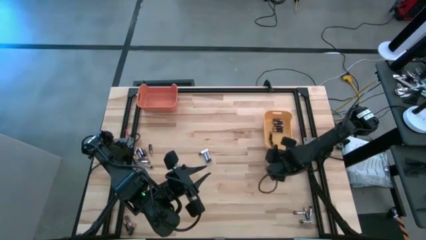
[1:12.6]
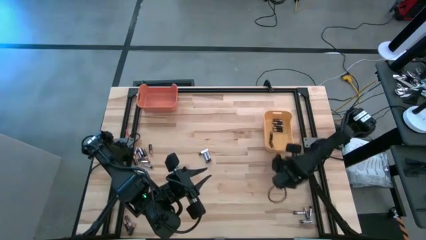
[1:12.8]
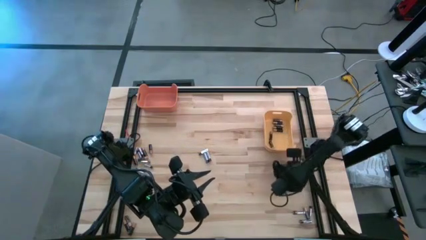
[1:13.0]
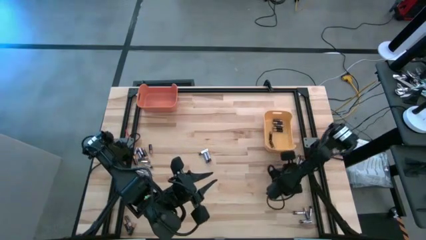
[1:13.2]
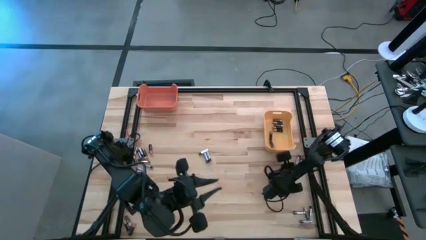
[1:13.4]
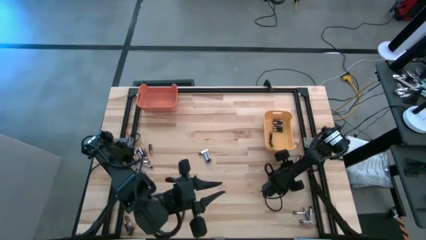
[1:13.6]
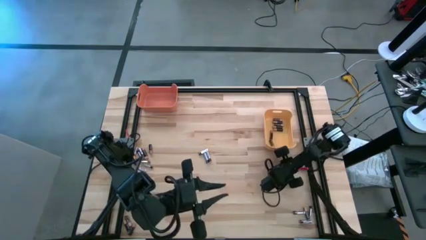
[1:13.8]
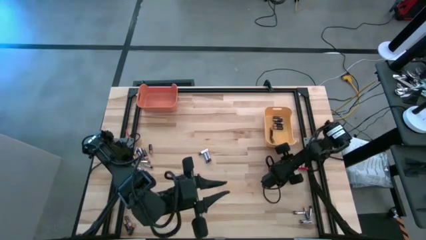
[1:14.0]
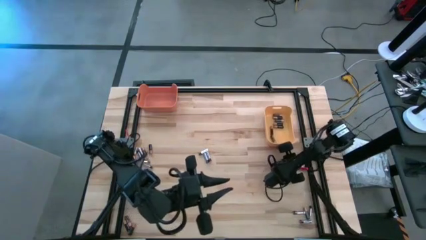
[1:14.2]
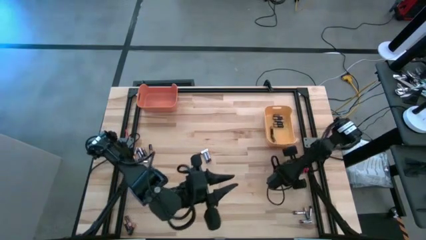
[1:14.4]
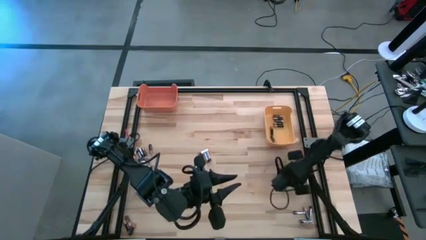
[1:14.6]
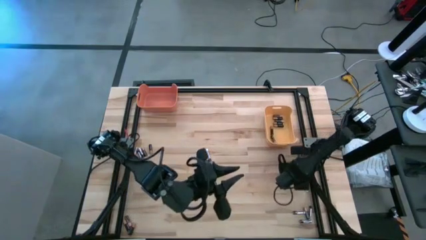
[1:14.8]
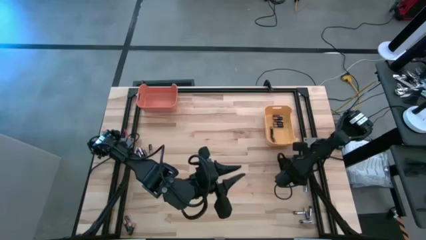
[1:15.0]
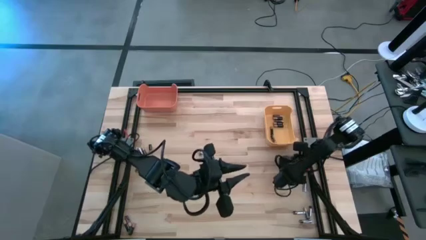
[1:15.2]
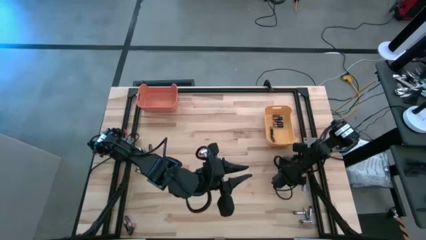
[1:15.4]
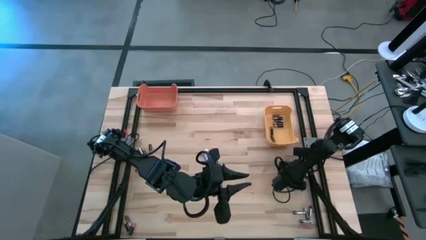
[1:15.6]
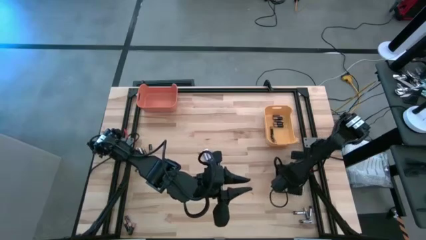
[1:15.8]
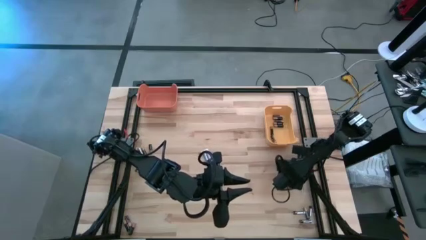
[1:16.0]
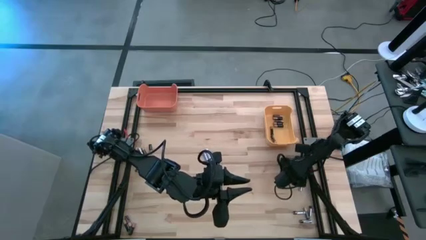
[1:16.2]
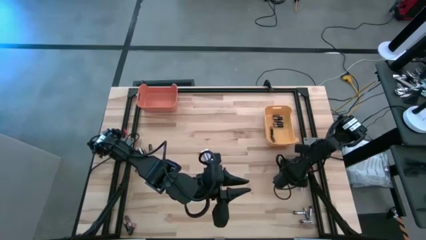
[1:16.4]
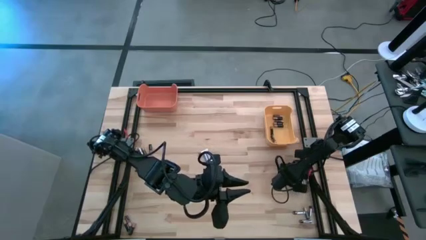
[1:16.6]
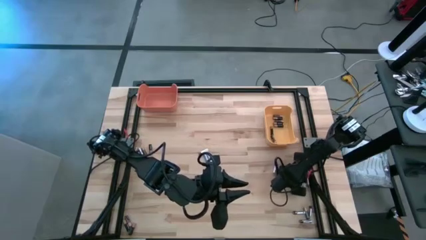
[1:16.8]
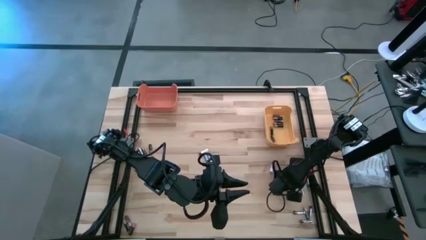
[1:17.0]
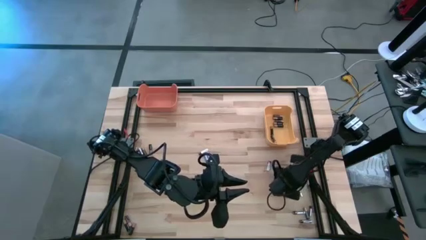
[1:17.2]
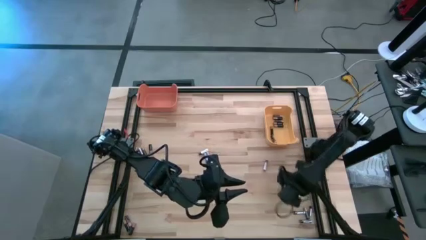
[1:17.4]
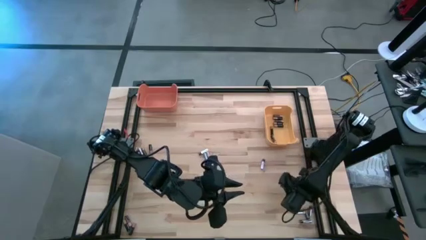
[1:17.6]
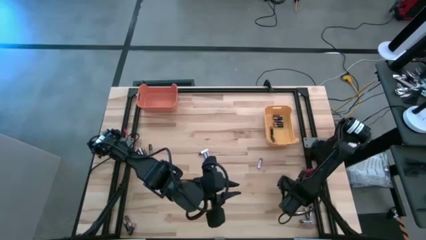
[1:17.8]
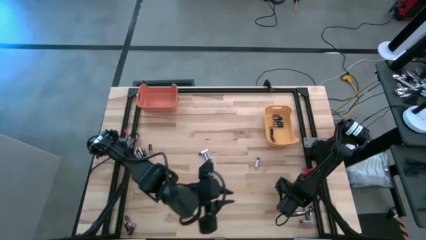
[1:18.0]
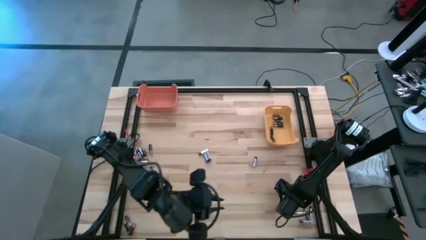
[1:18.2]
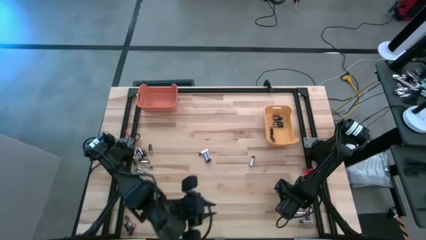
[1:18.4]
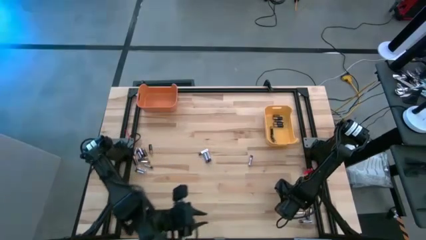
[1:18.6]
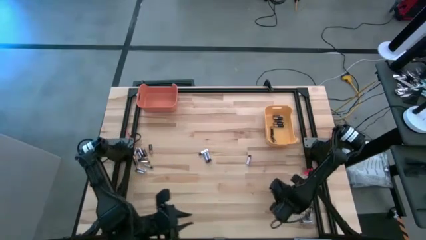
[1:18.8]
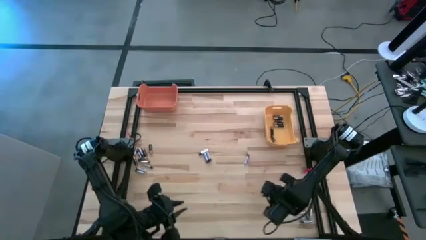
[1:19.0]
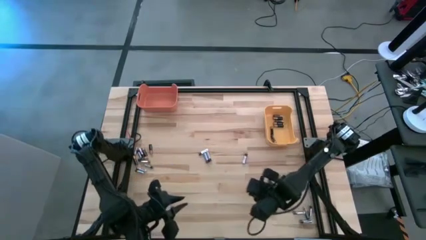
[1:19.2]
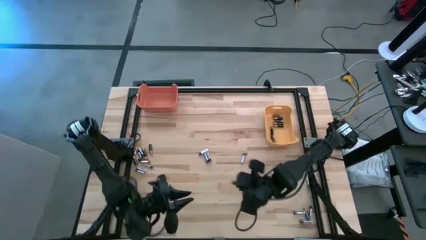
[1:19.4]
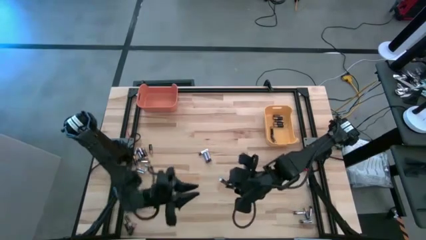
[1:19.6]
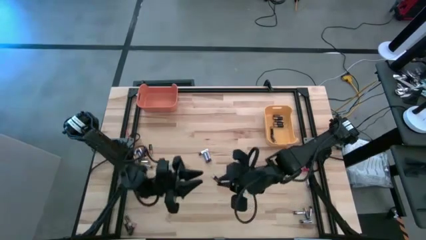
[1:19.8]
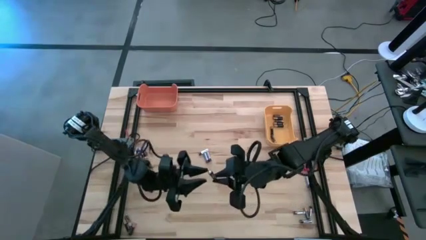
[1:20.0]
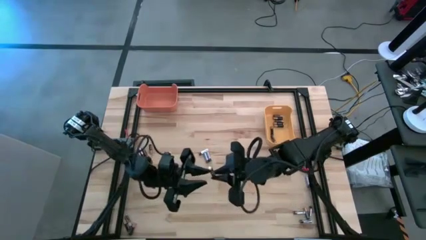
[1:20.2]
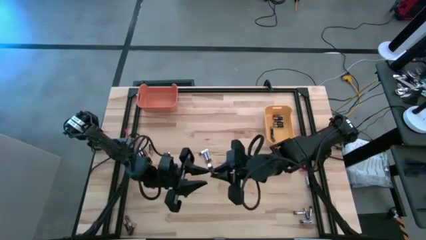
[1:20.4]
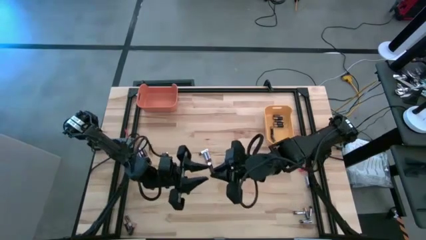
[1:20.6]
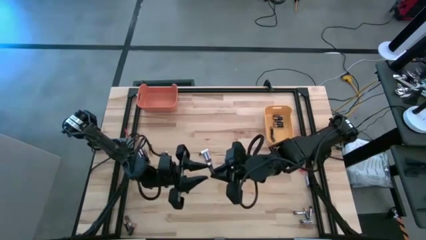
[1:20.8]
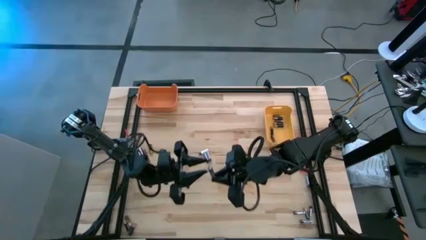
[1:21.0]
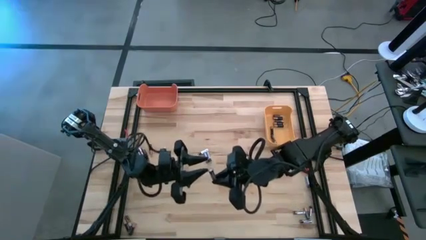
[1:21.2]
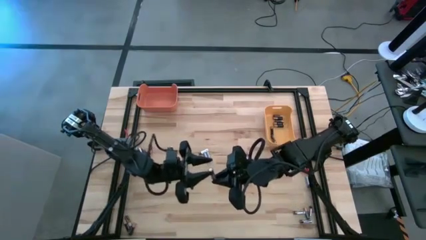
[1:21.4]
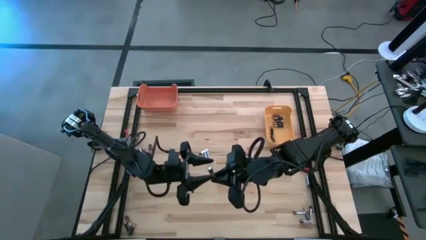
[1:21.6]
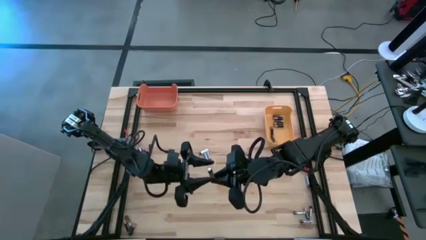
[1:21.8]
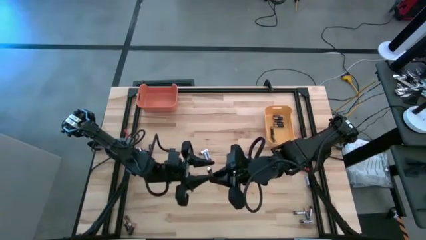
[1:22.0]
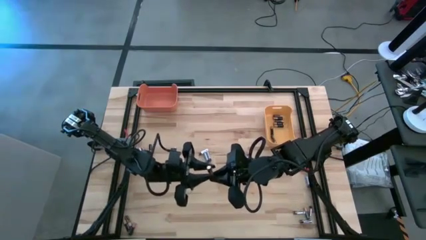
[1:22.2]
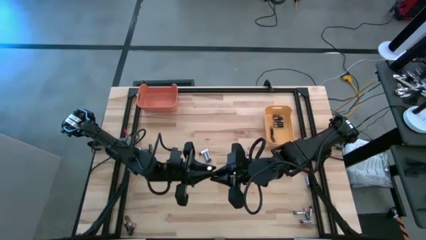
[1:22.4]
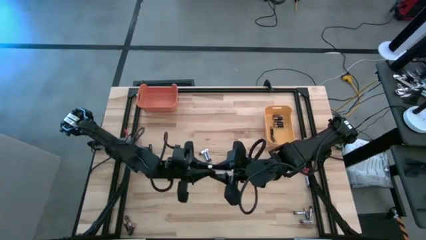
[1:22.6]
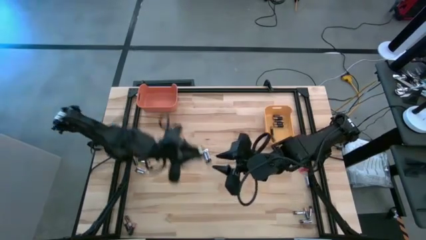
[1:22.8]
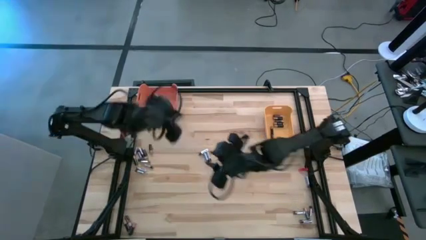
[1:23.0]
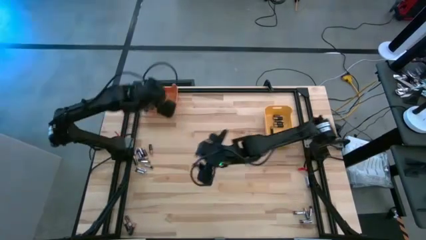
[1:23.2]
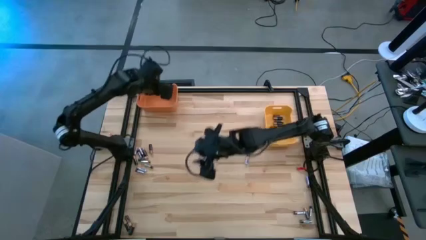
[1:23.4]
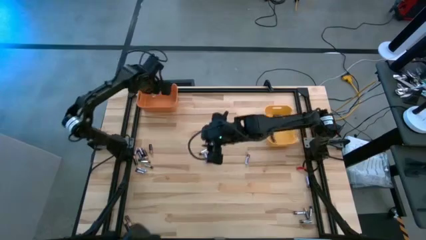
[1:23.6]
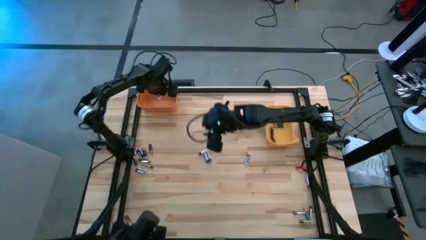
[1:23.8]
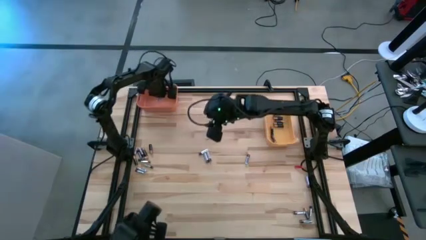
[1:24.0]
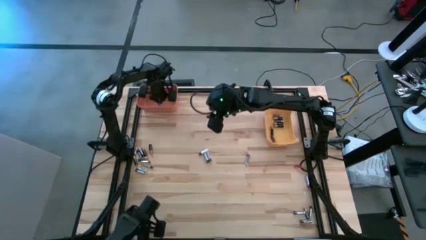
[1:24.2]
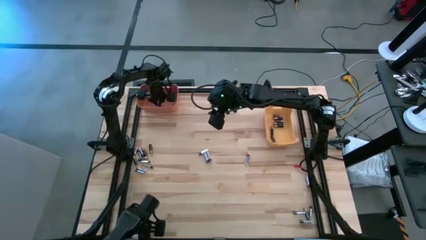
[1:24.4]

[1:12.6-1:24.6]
Task: Sort batteries
Put the silver battery into the orange bin

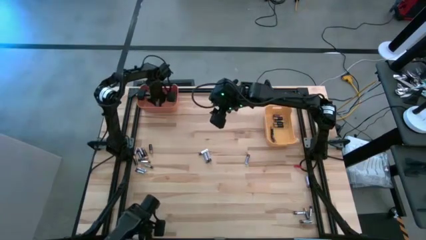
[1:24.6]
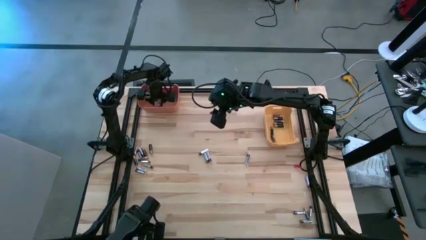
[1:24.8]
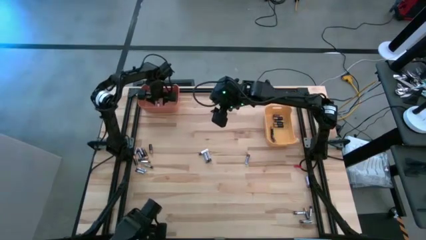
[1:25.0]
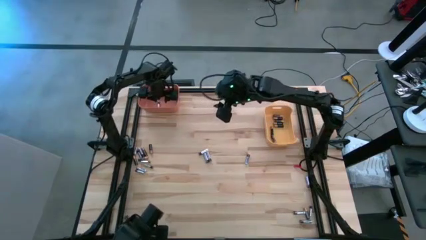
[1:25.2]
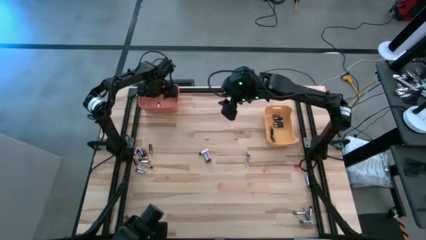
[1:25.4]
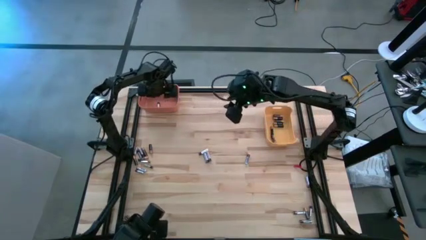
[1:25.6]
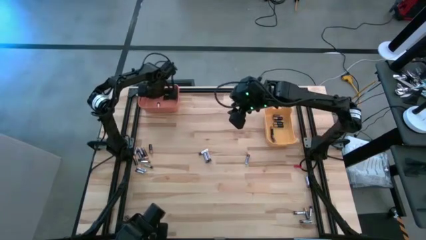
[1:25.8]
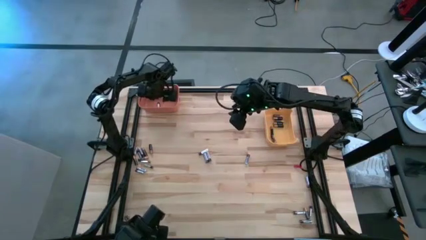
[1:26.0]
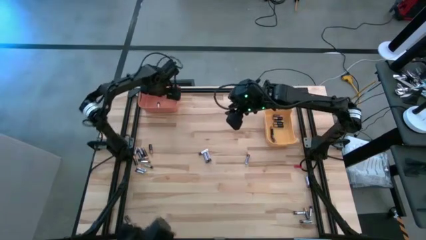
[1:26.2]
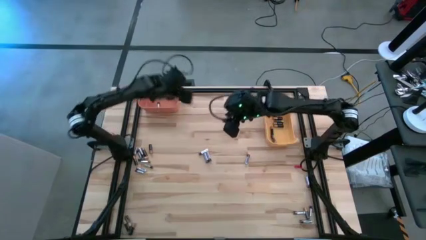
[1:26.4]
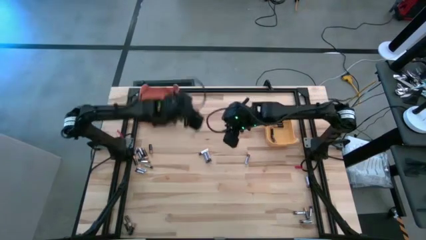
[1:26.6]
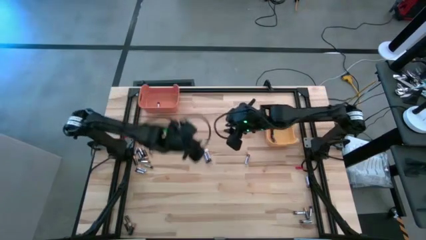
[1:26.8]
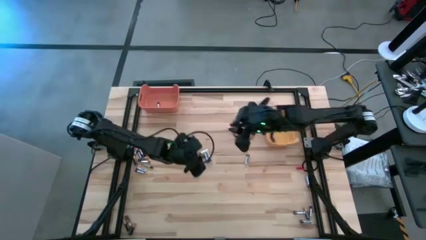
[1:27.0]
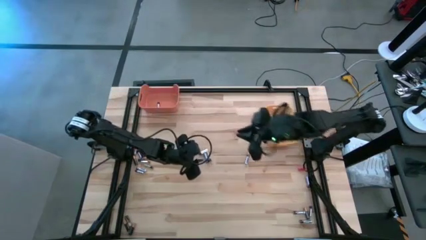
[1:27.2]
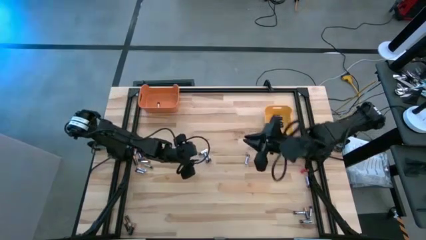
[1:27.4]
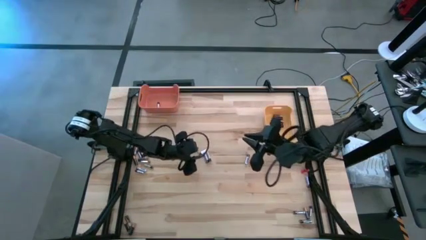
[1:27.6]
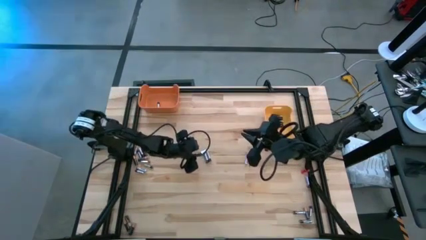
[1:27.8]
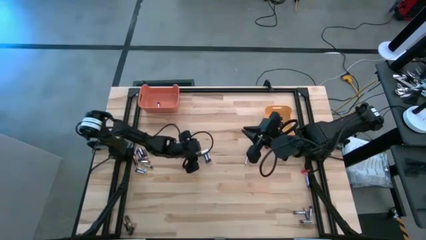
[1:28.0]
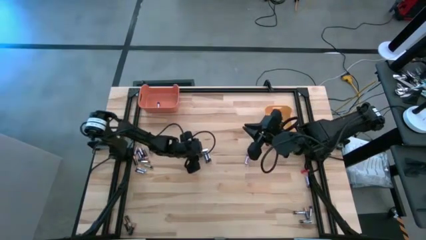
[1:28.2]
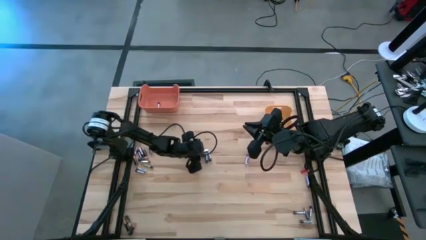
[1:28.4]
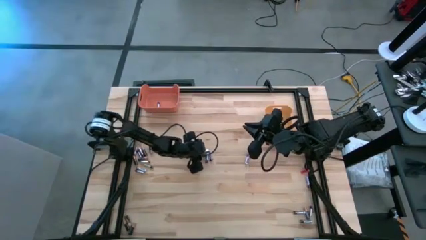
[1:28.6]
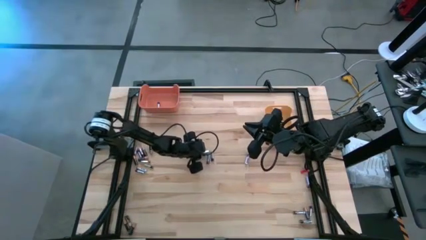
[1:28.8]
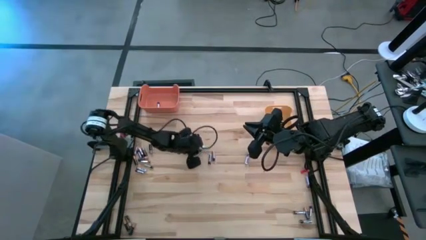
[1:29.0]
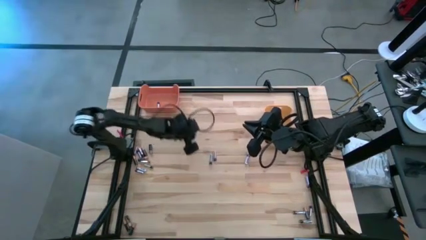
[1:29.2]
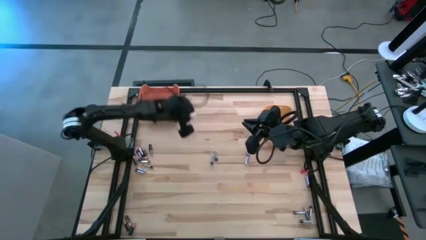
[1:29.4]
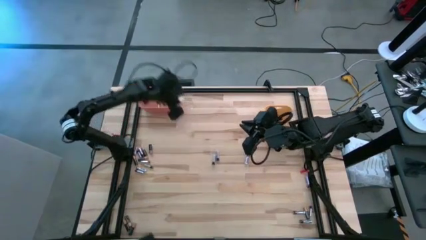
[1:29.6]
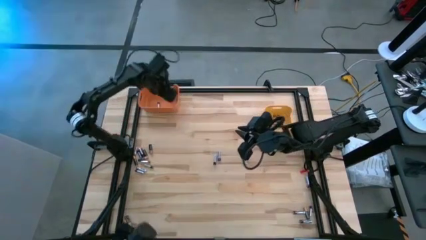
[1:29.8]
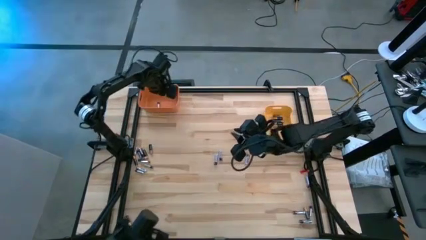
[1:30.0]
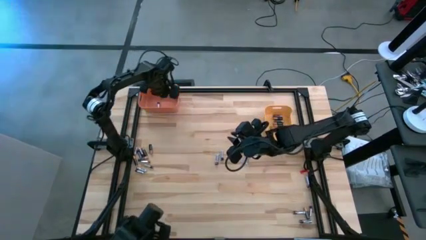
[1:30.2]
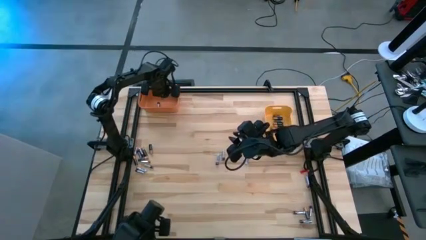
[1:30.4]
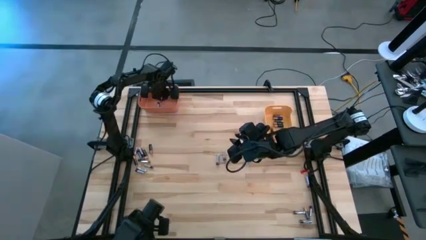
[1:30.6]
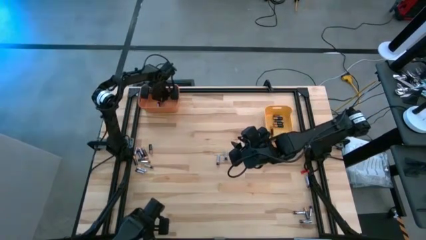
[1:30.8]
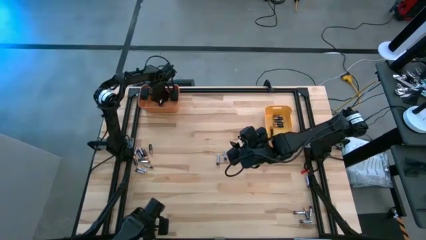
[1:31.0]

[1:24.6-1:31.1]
Put the silver battery into the orange bin
